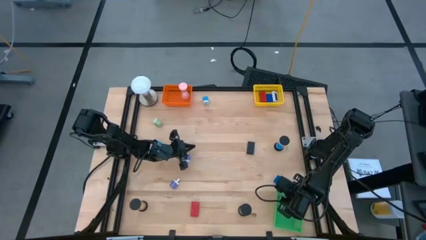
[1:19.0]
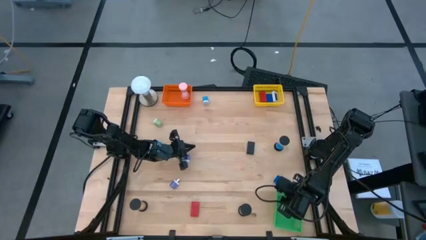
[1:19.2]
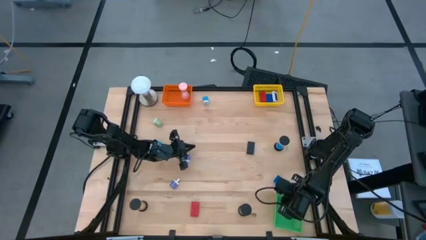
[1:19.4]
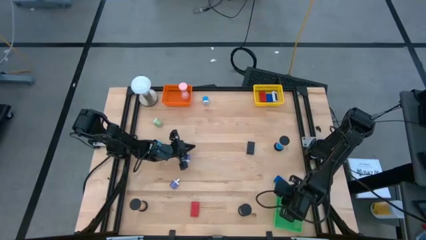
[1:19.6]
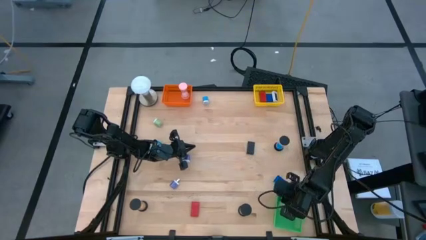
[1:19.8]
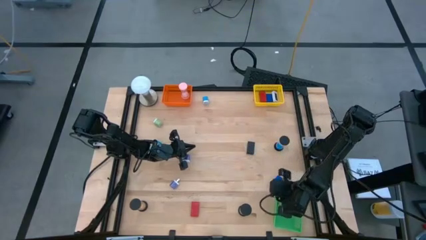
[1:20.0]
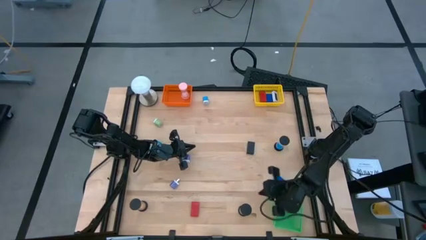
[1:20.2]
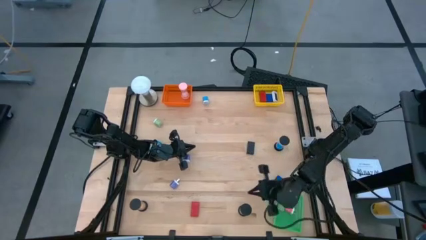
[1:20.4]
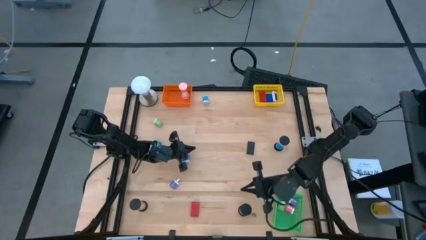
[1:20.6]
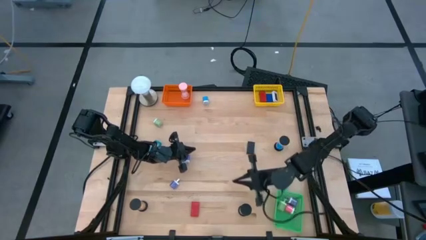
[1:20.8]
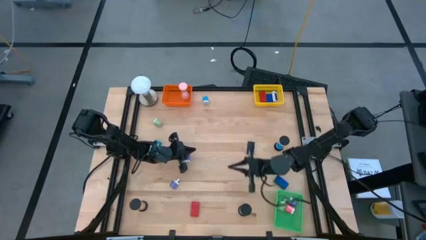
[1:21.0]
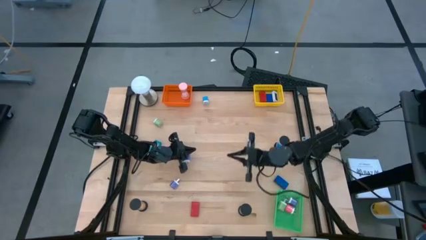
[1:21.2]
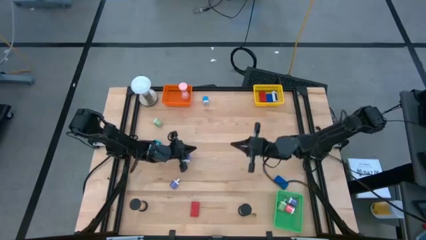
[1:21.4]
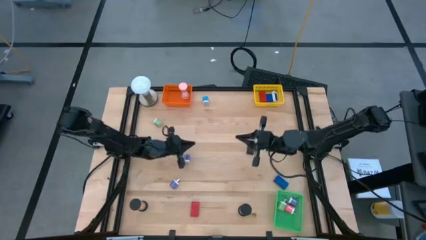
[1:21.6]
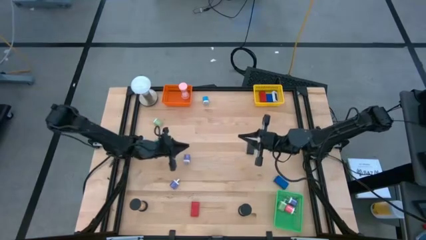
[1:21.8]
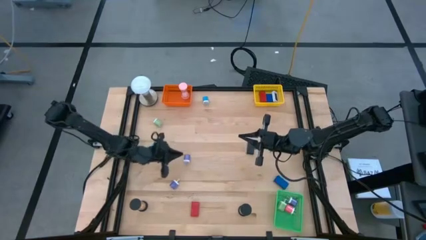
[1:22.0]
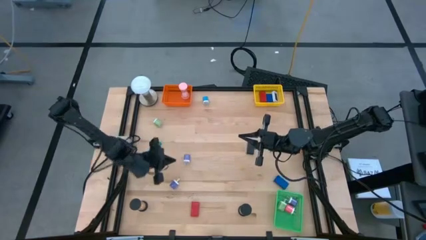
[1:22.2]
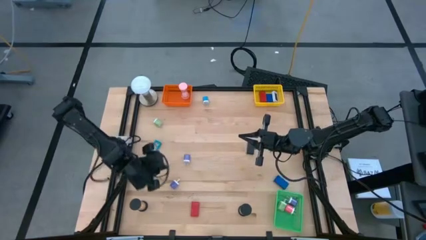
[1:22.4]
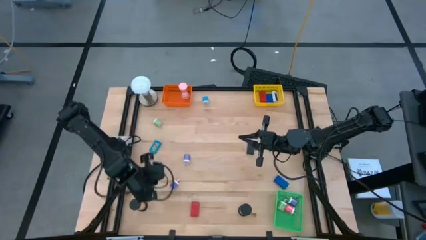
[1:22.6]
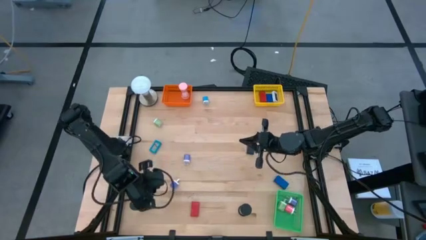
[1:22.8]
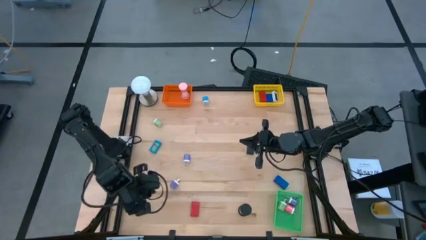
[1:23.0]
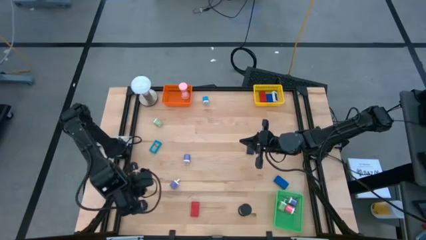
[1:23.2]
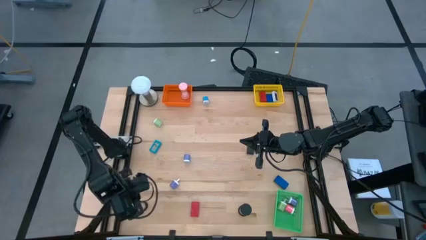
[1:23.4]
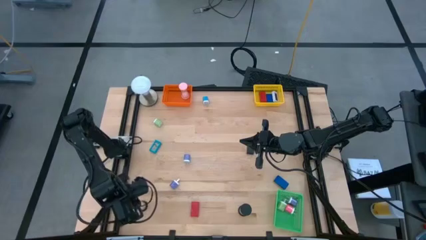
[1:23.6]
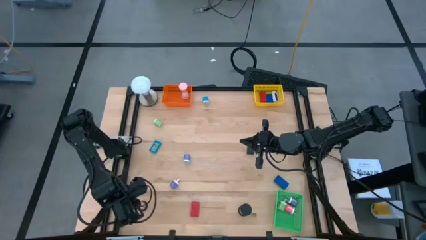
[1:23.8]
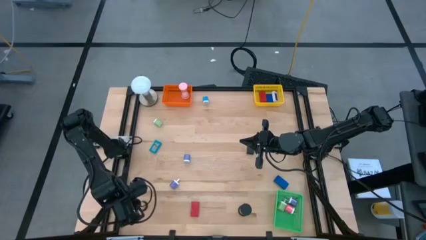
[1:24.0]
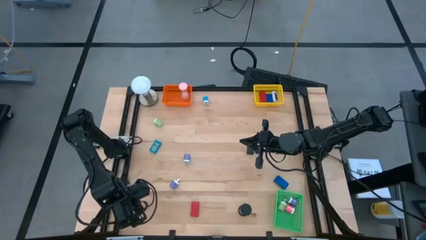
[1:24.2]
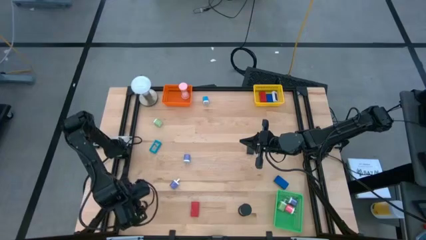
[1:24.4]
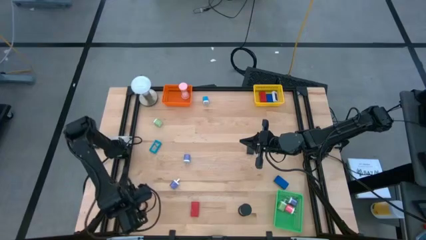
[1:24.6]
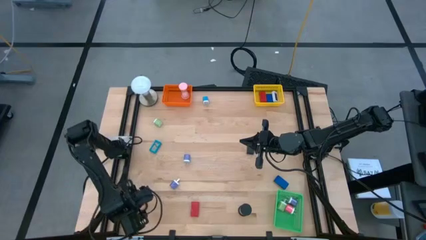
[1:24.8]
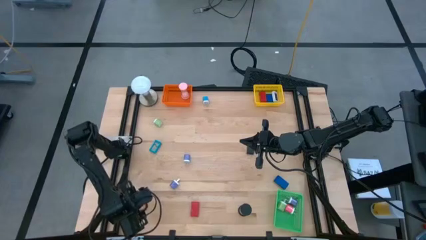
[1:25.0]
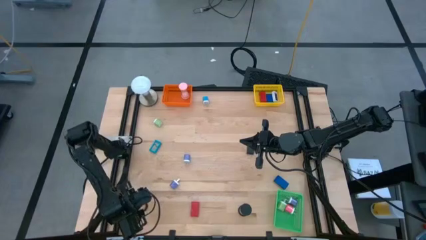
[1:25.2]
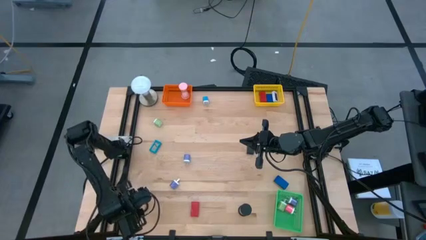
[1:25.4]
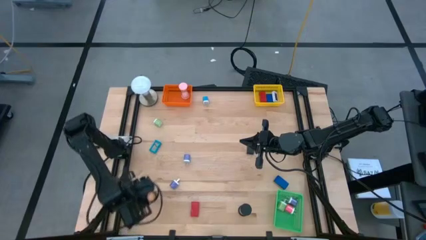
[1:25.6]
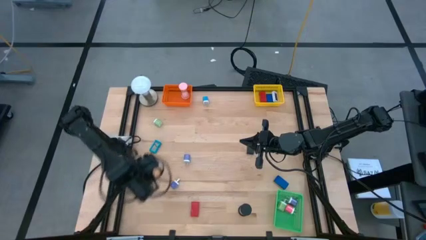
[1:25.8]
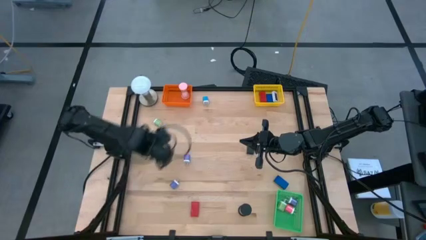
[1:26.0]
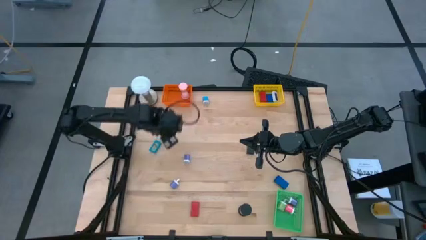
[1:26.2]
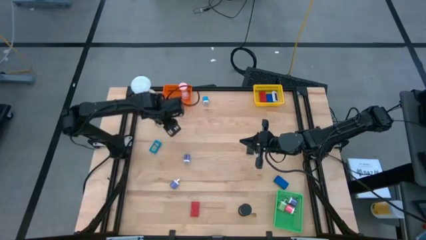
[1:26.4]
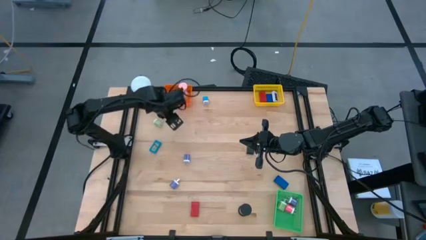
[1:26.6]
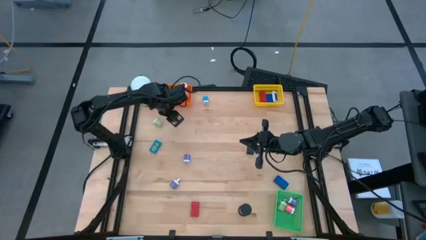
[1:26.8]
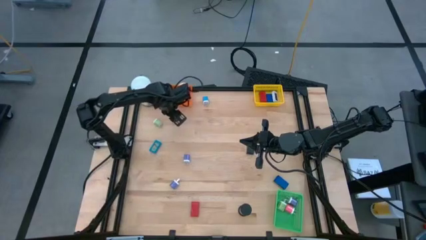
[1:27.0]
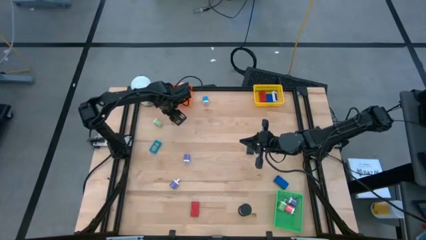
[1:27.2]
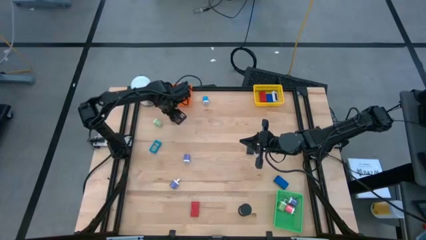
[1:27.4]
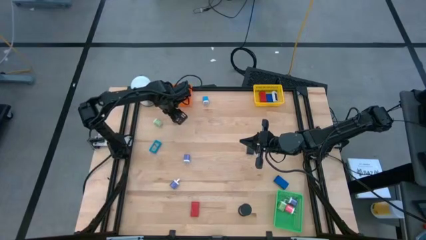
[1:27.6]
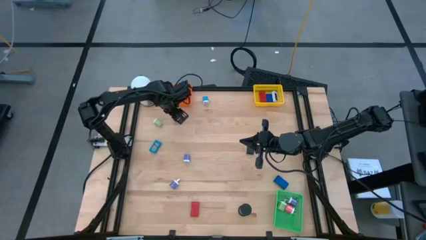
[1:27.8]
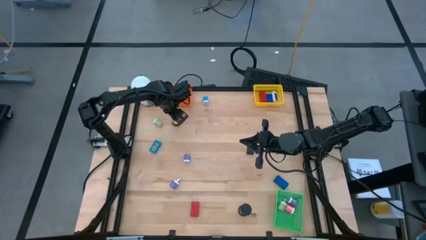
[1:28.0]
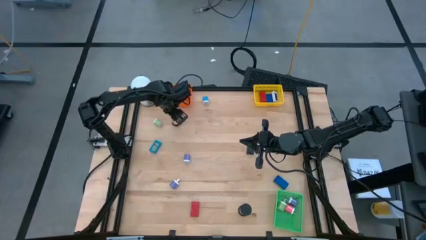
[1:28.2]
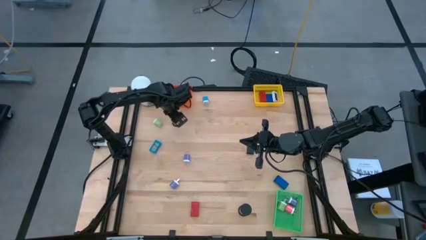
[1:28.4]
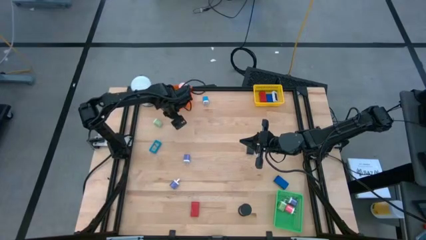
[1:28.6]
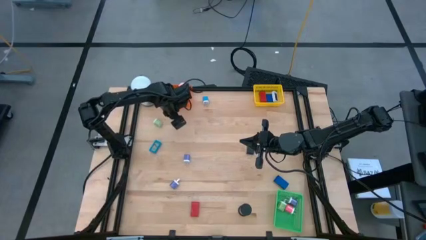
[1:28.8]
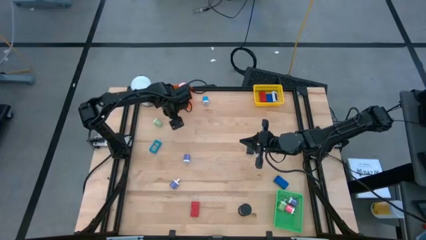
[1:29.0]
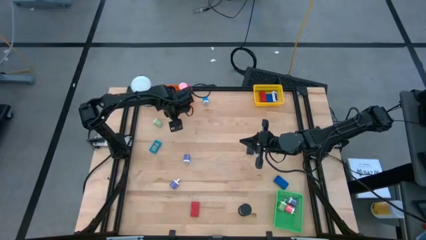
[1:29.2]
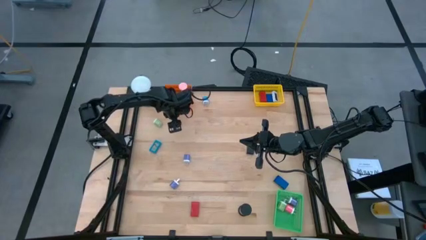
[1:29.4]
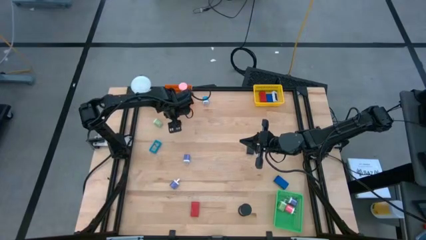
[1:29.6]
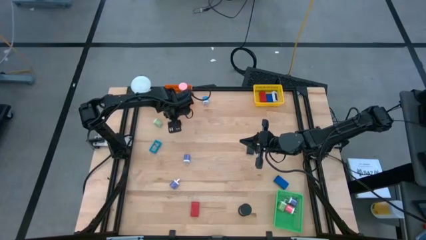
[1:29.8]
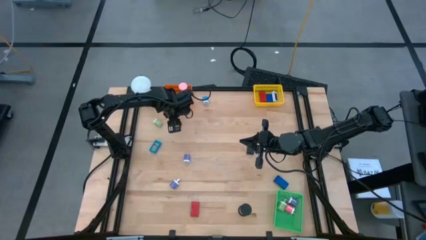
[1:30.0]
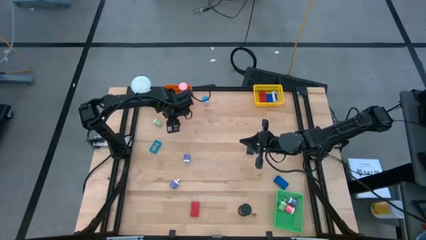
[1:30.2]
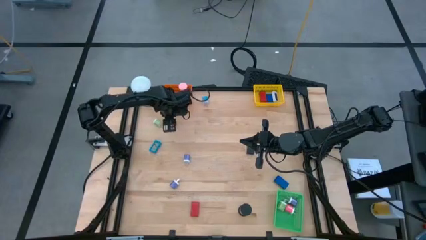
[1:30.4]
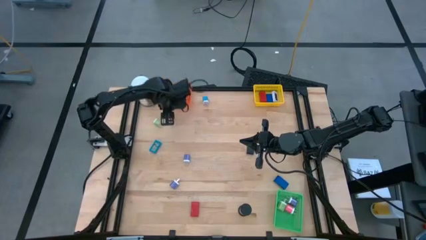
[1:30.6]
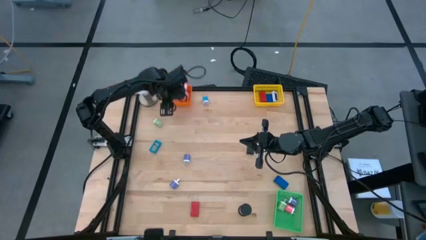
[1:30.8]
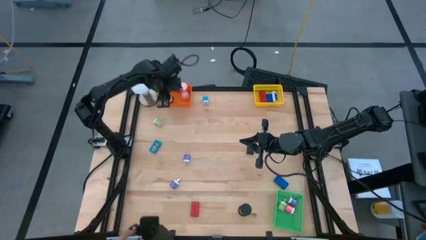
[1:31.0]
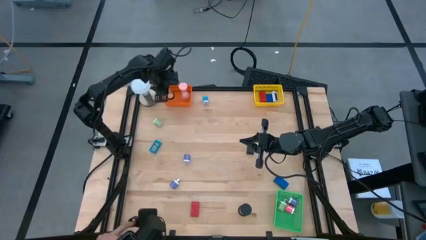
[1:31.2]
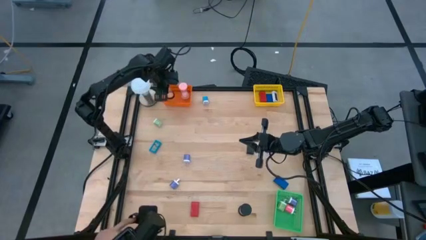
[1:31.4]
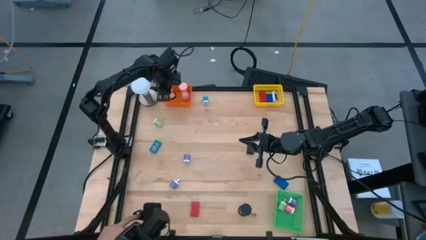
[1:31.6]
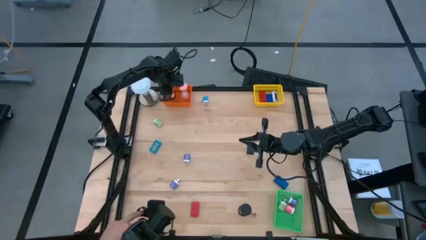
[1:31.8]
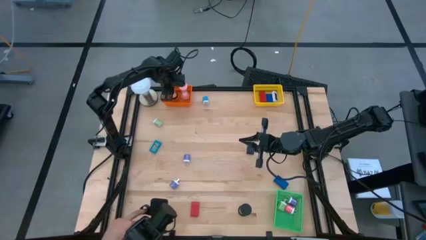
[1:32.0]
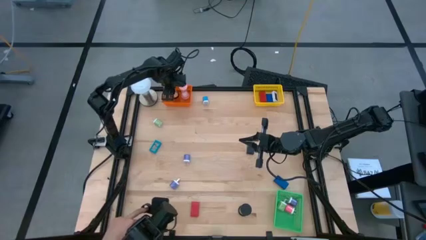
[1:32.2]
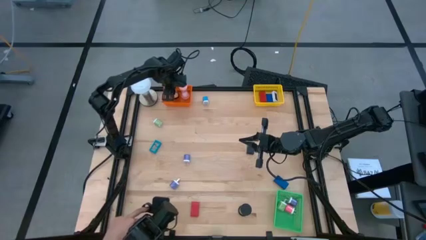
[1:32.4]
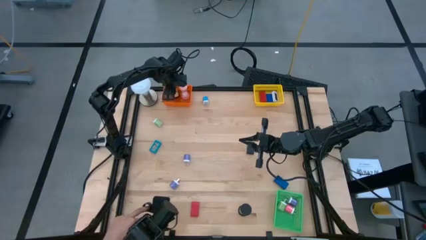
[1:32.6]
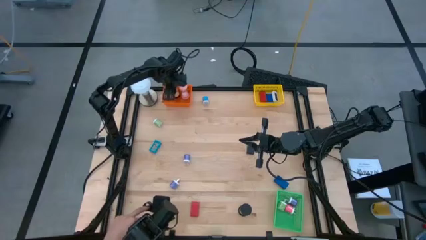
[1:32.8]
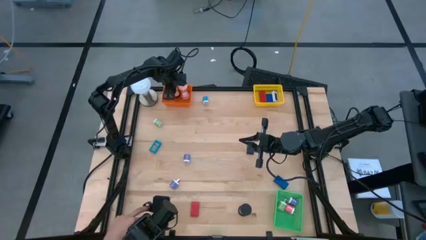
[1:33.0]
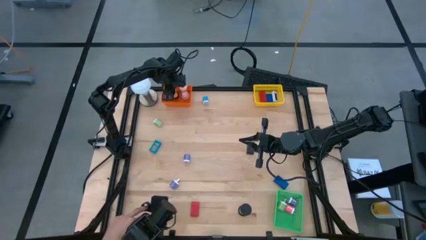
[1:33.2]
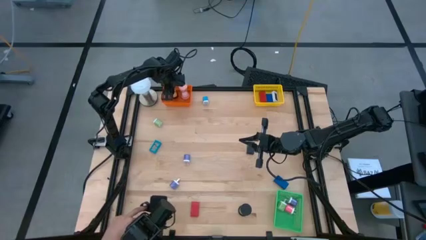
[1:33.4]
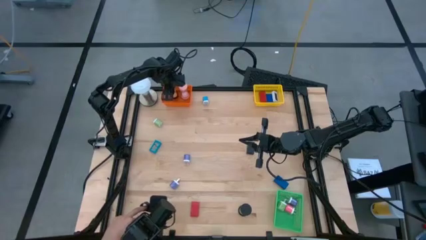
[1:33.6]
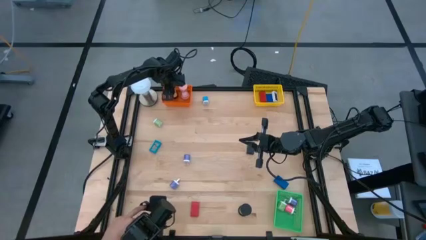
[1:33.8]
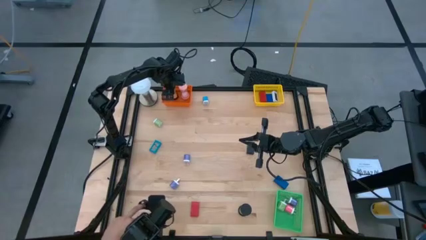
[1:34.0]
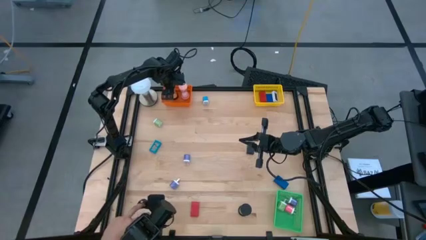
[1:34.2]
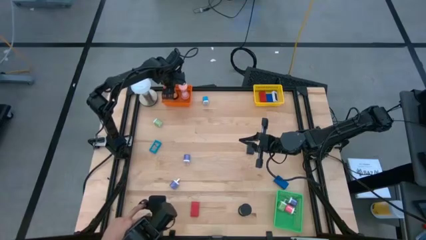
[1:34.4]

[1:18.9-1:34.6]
Task: Pick & Place Office items
Put the orange hourglass into the orange basket

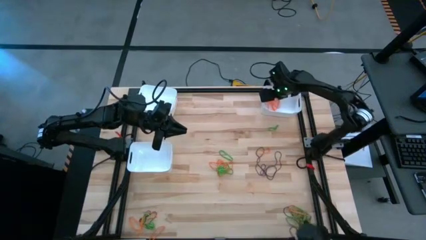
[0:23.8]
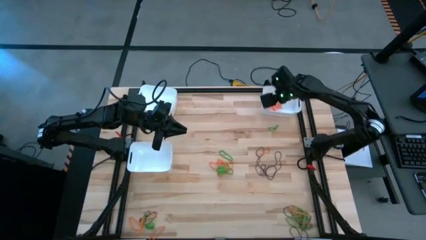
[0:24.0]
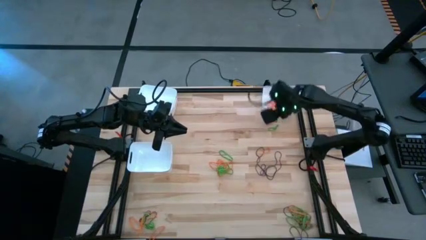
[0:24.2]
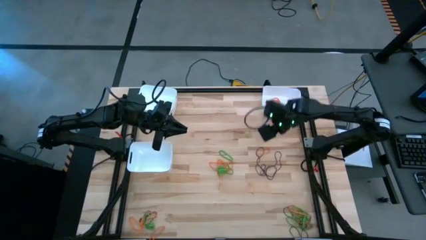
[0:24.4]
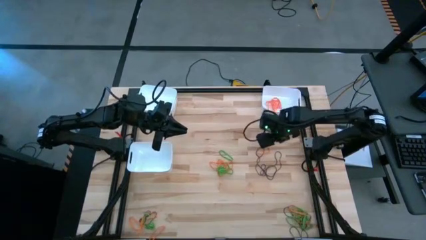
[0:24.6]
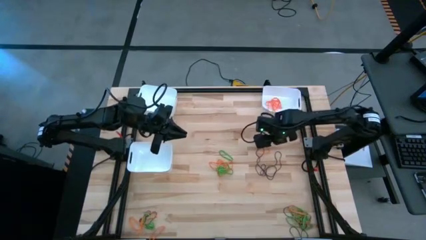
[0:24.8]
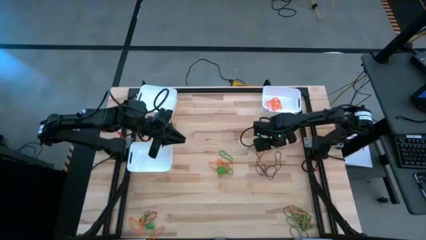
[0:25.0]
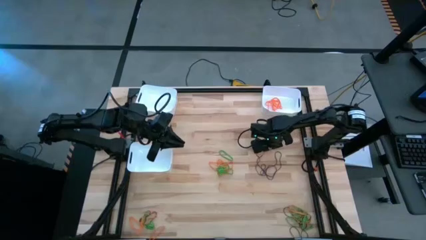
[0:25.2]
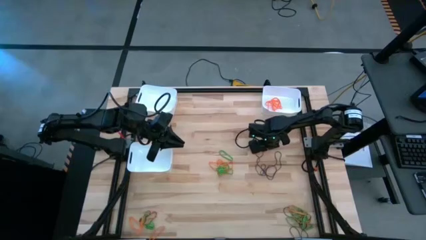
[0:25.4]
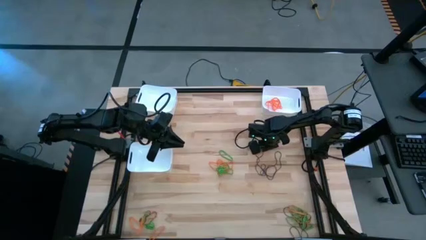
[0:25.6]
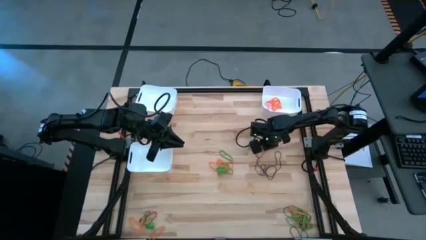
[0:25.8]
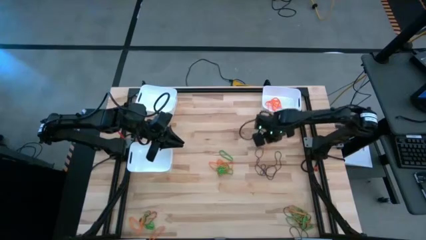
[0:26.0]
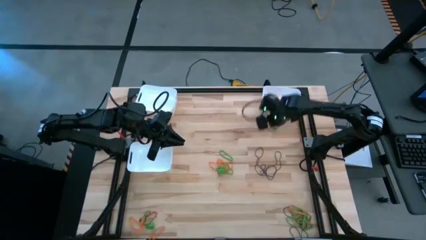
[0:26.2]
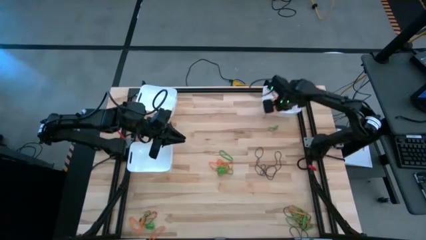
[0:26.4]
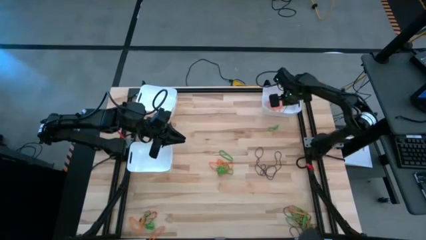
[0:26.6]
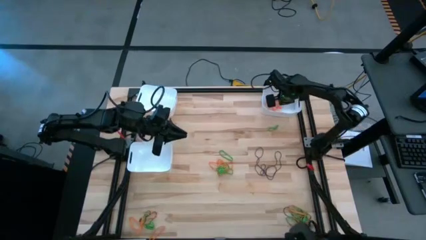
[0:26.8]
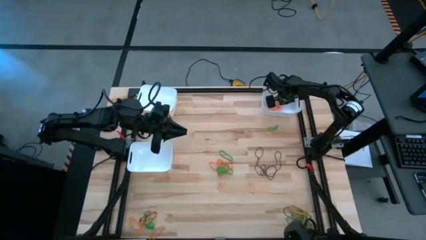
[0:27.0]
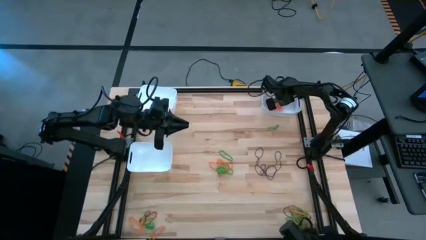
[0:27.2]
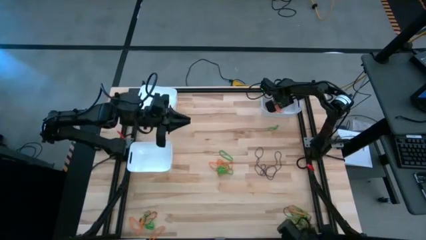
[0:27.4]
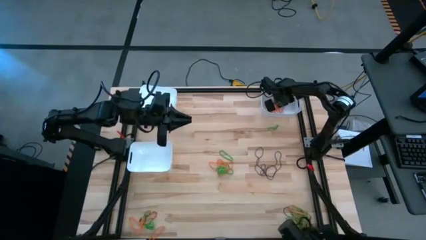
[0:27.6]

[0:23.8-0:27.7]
Task: Sort rubber bands into baskets
Put the orange rubber band into the top right white bin
